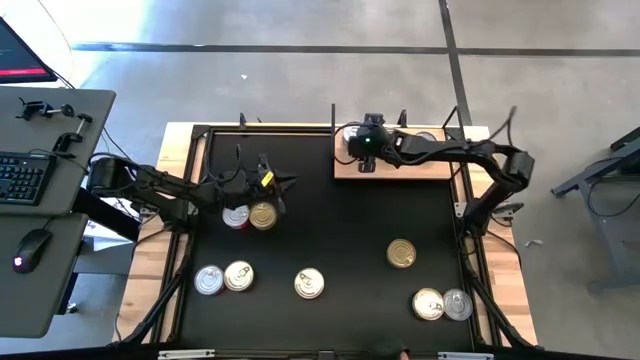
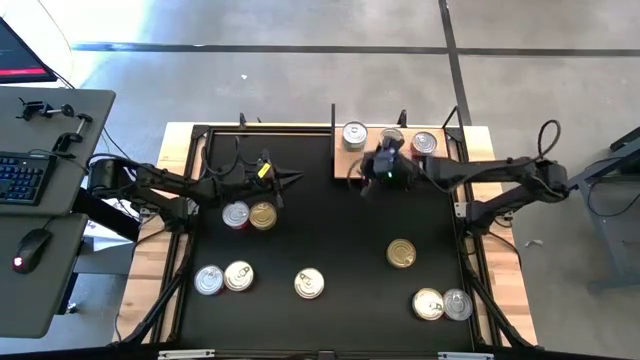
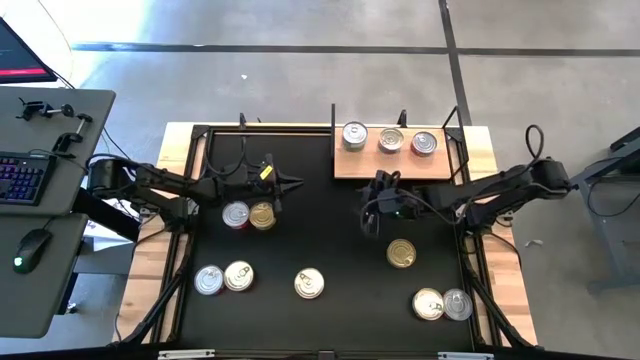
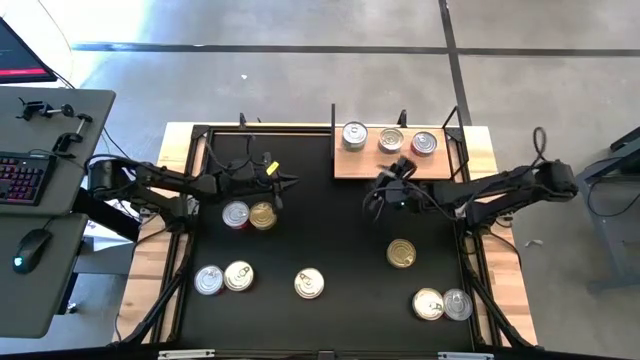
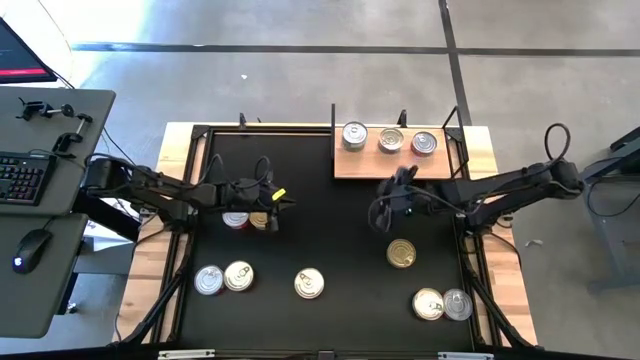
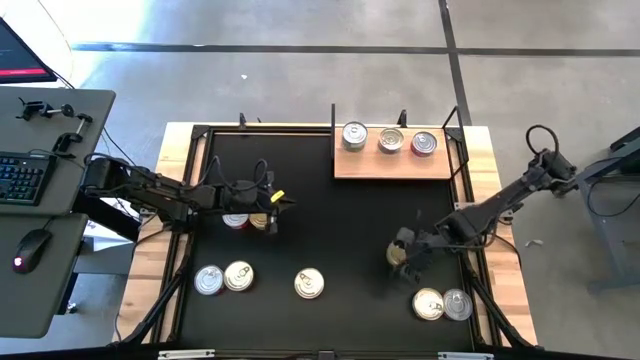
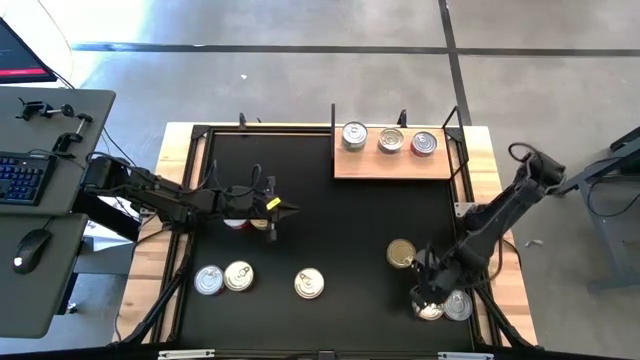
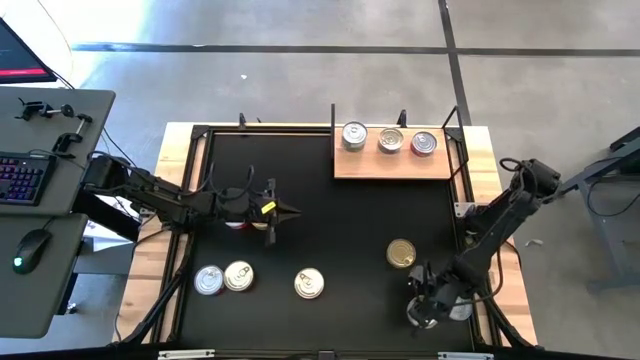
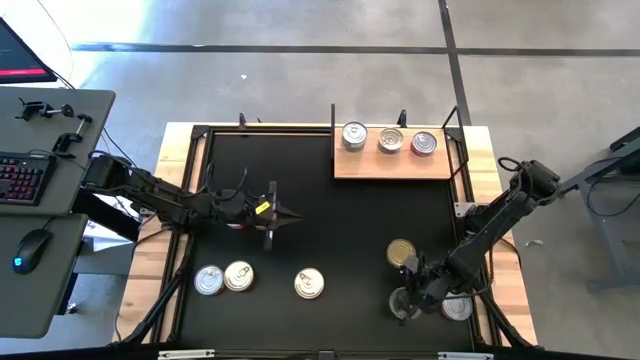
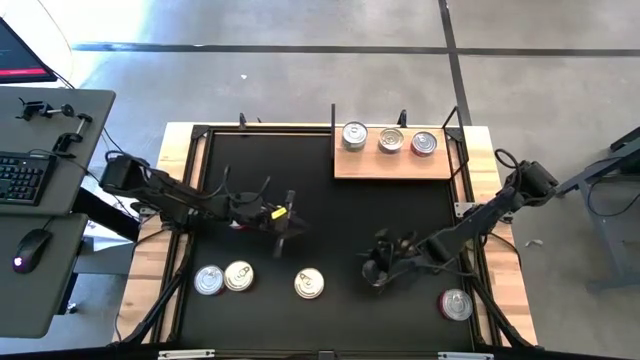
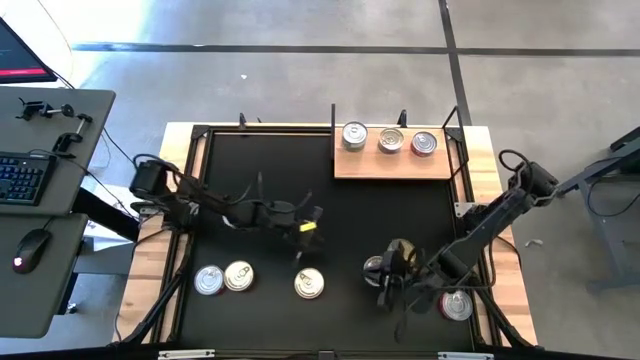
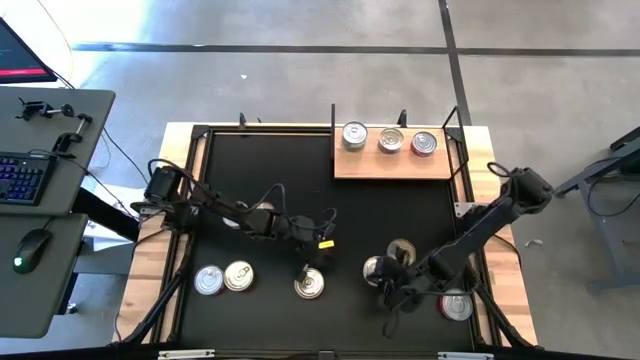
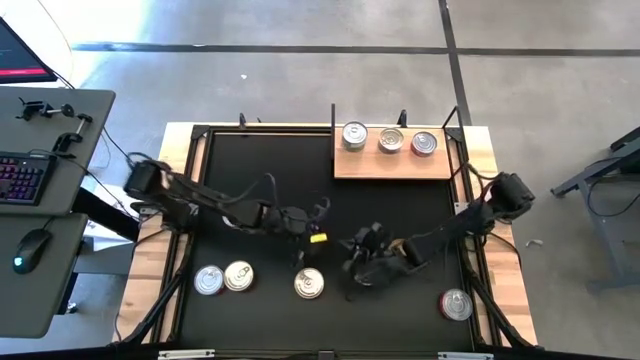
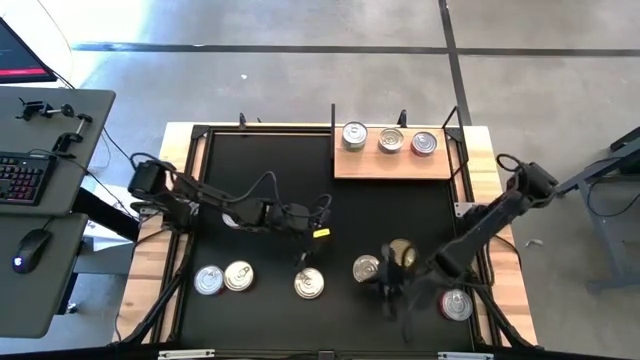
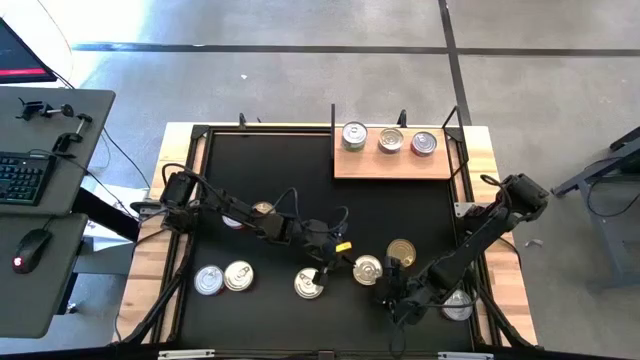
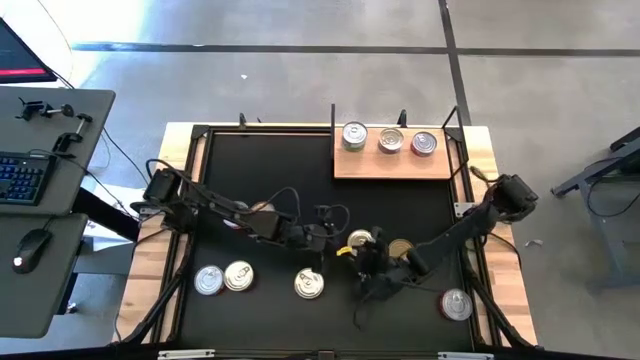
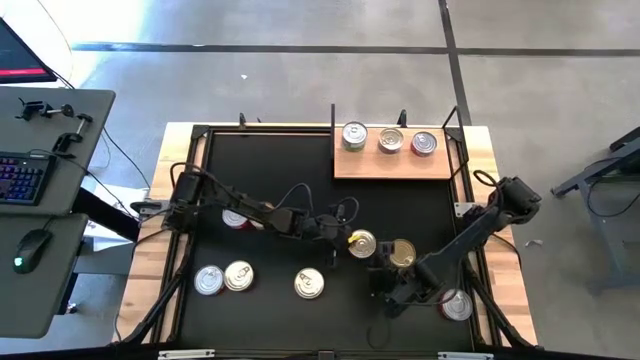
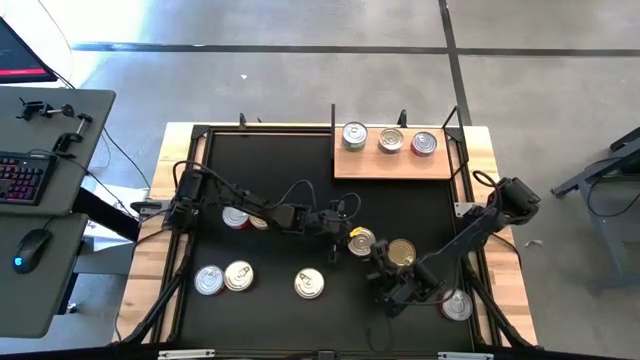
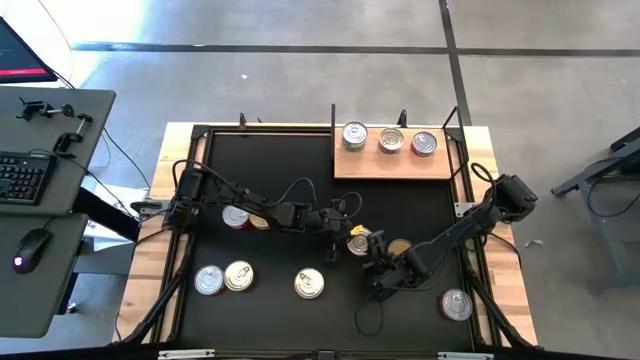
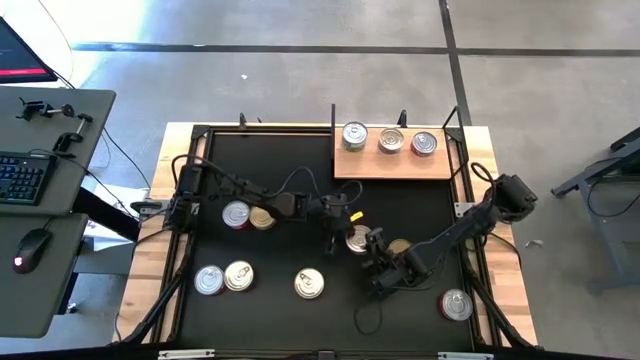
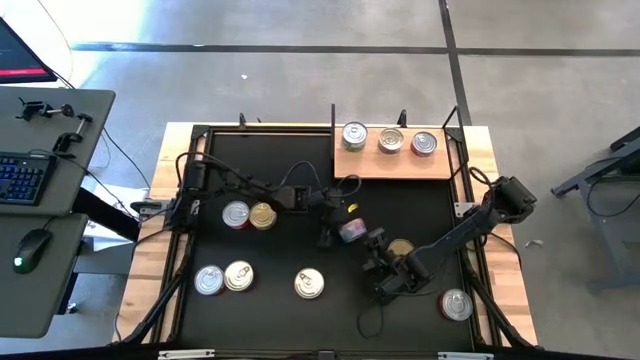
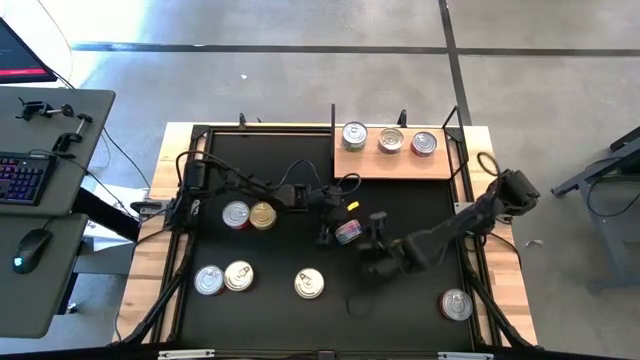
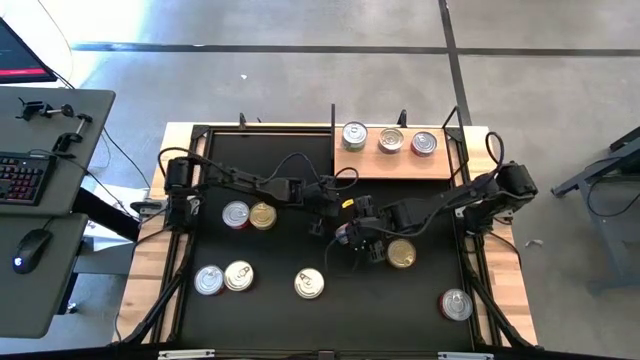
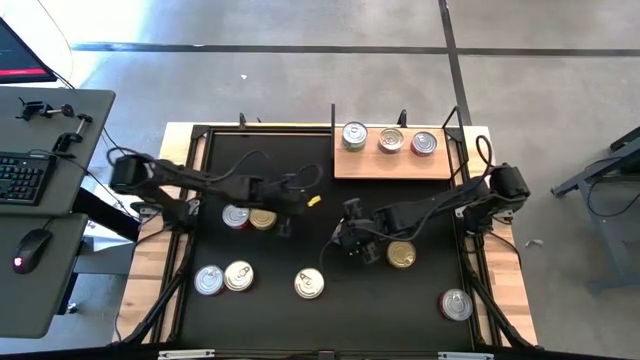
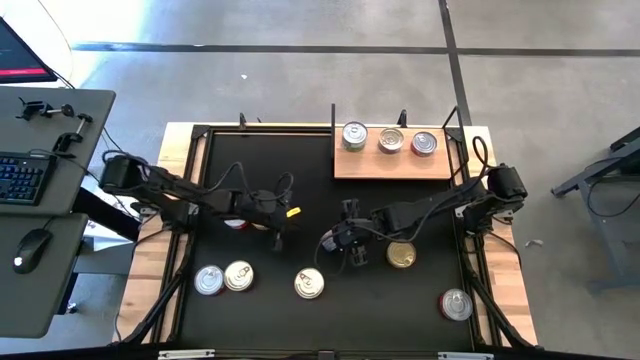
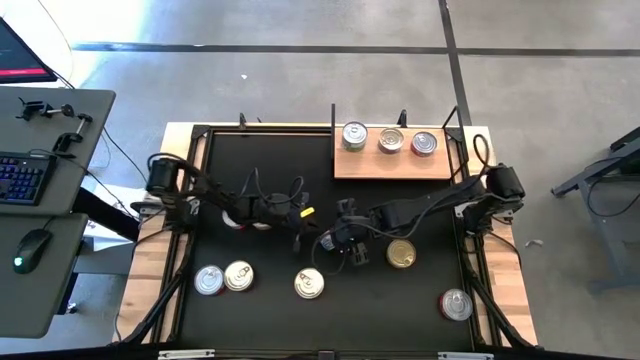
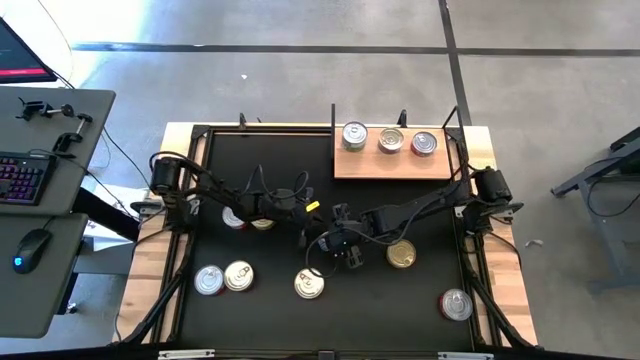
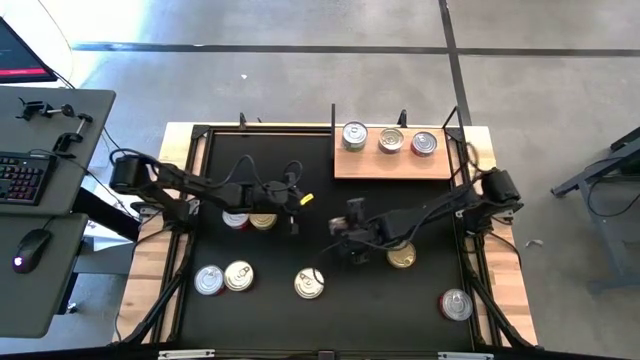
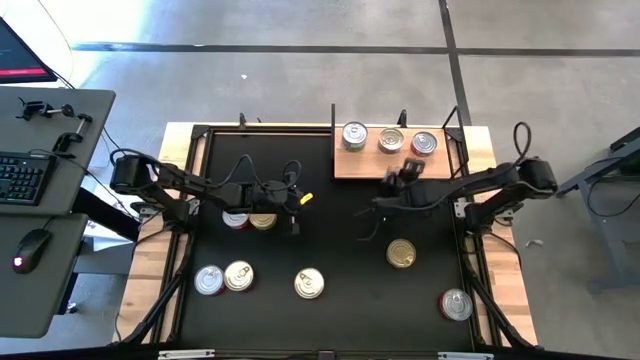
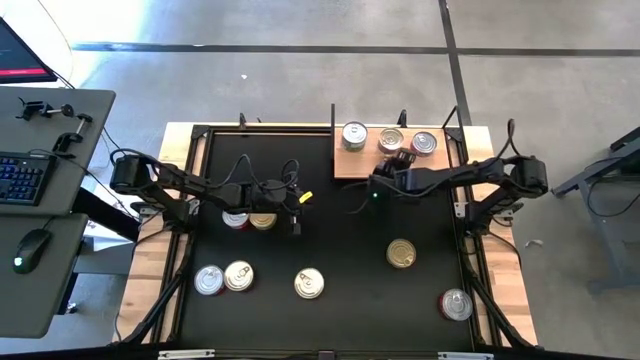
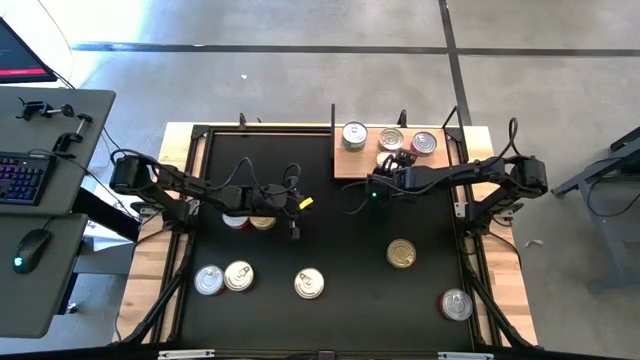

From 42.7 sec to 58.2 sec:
Task: Stack canned seafood by type on shelf
Put the blue-pink tuna can on the shelf

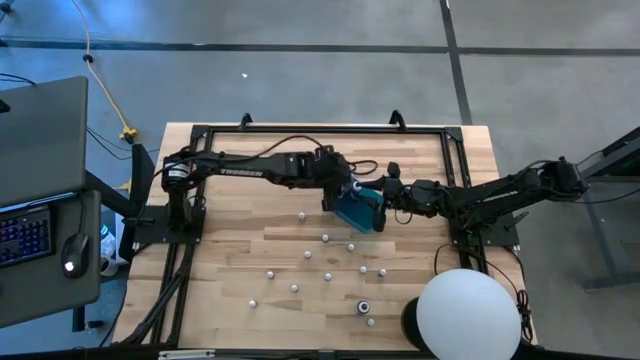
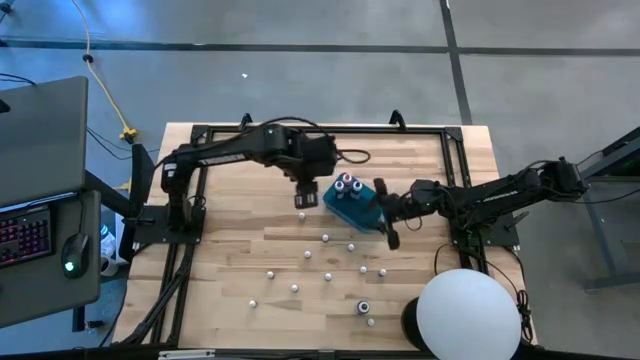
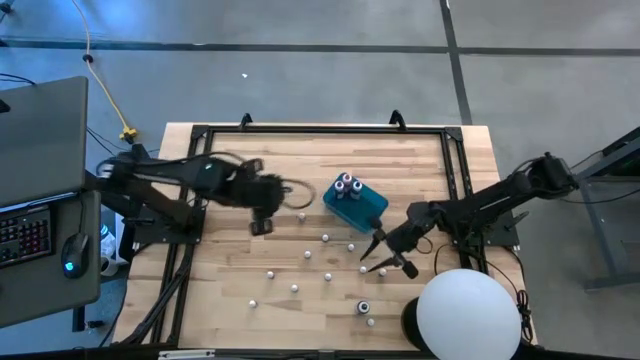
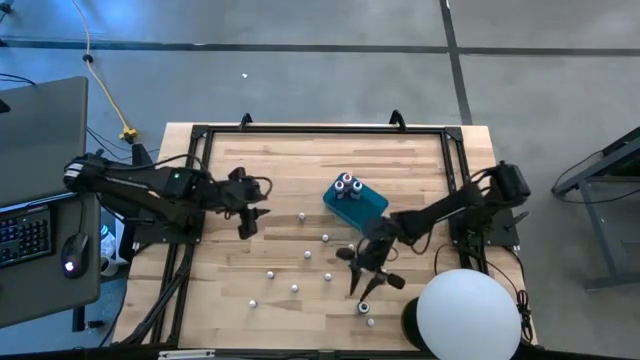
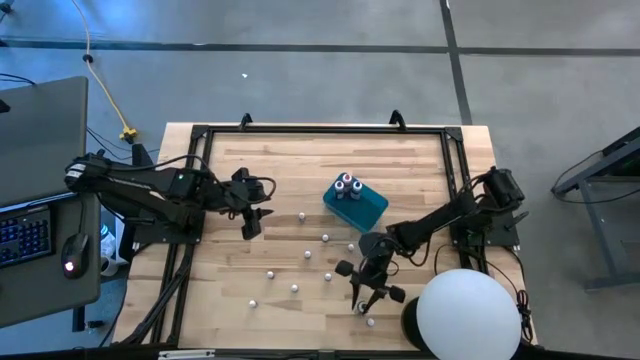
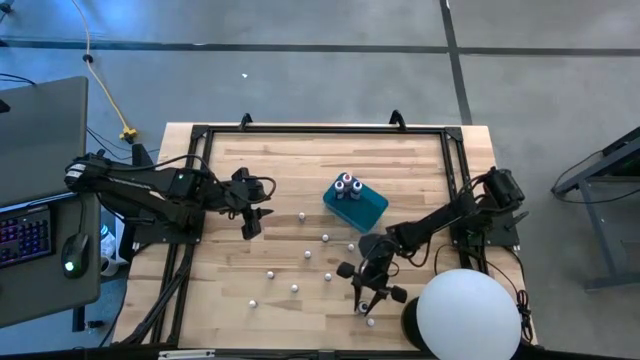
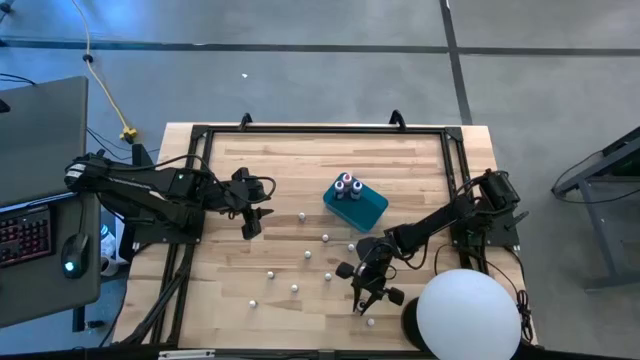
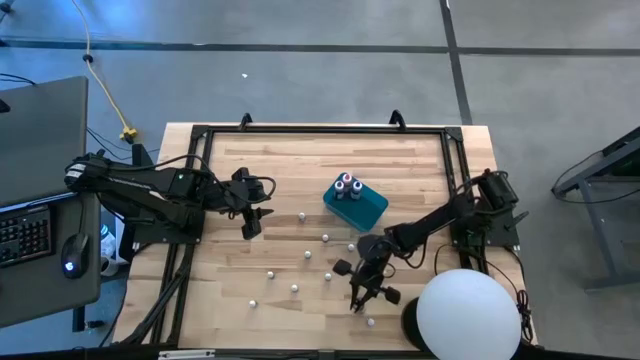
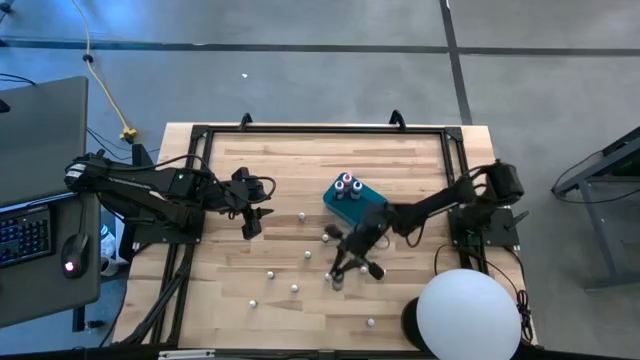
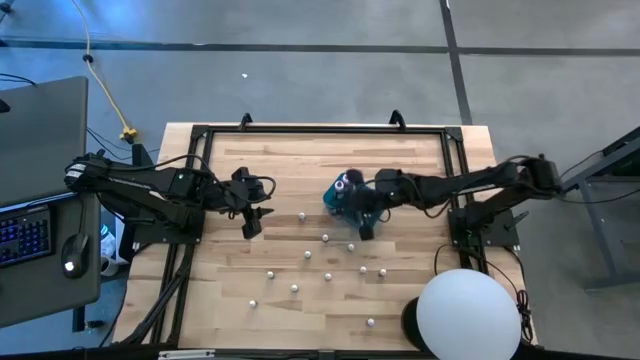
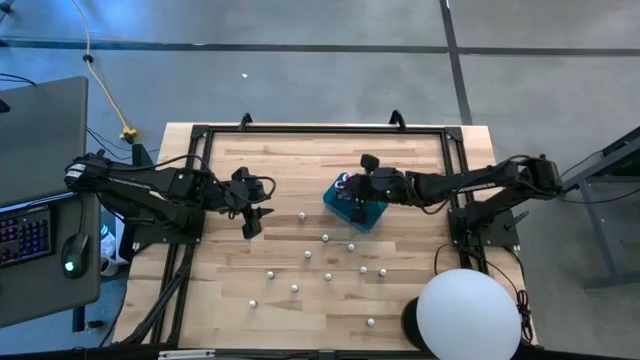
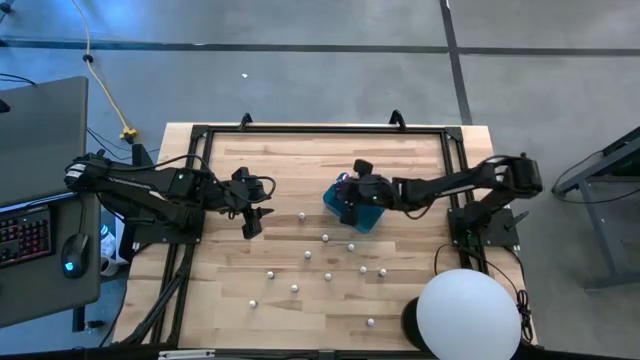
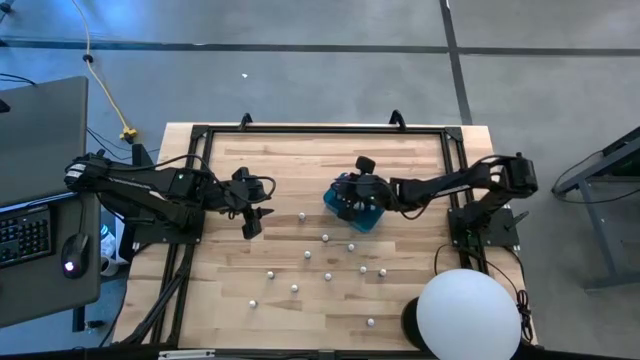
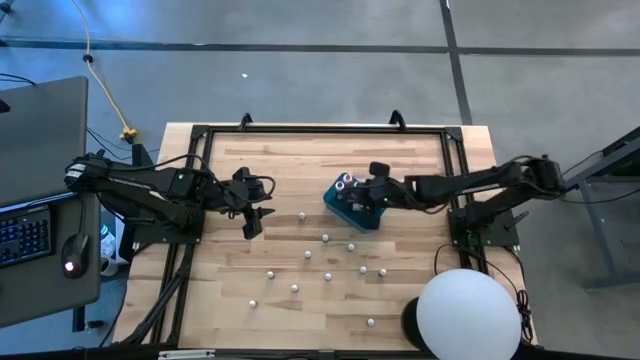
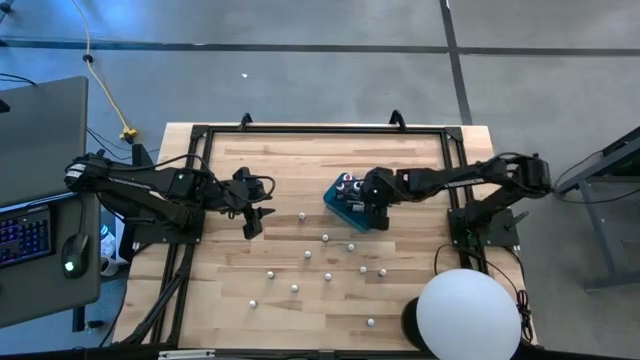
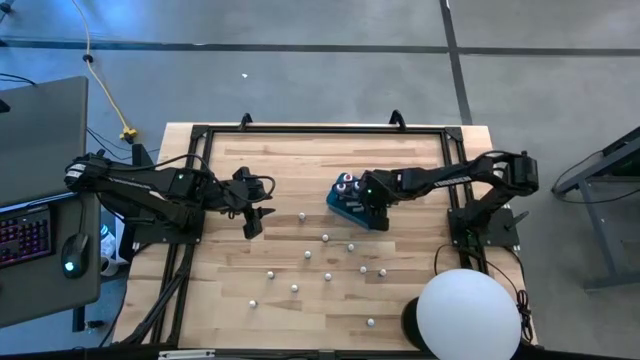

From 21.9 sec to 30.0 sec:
Task: Pick & Place food coloring
Put the large black food coloring bottle into the blue container
